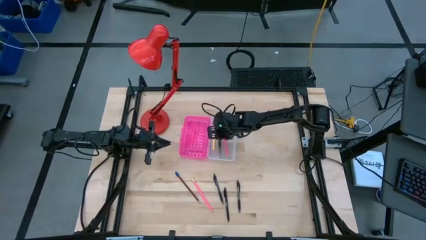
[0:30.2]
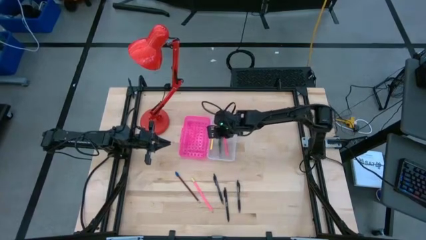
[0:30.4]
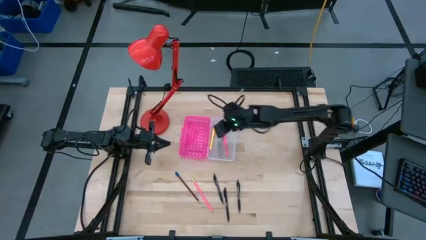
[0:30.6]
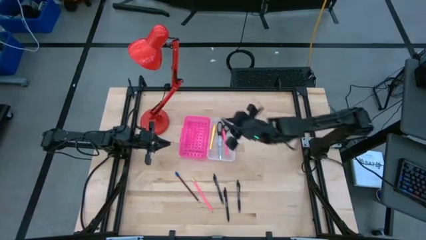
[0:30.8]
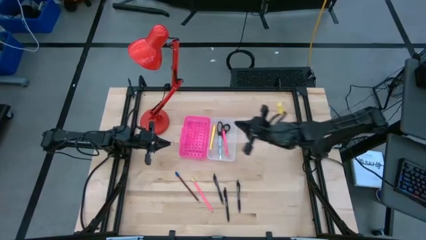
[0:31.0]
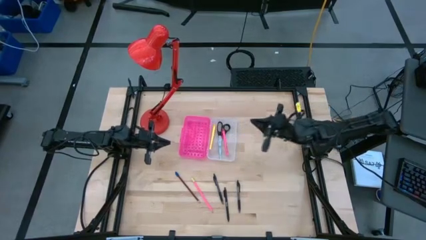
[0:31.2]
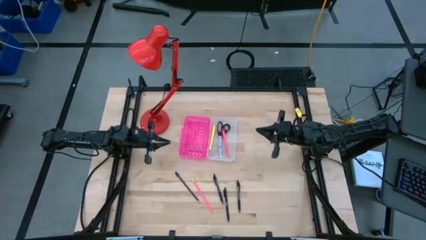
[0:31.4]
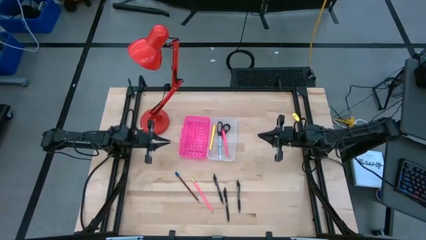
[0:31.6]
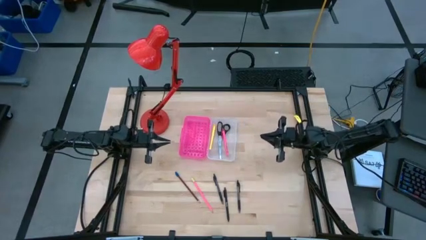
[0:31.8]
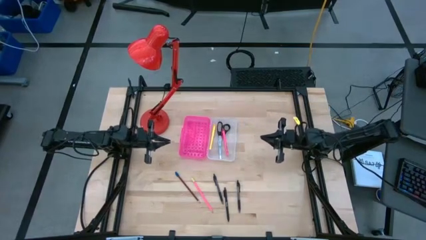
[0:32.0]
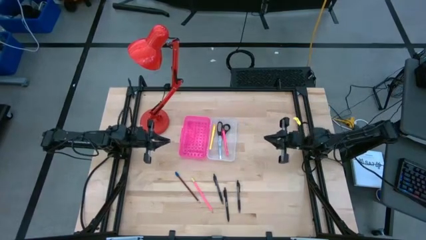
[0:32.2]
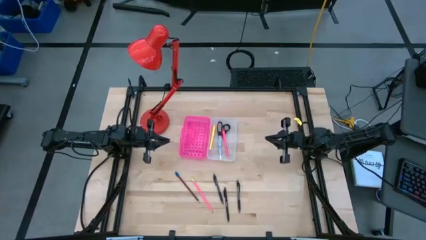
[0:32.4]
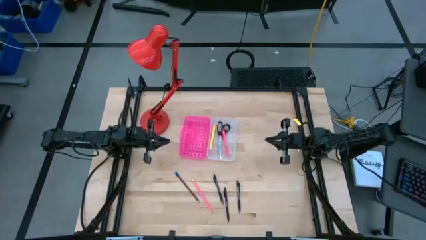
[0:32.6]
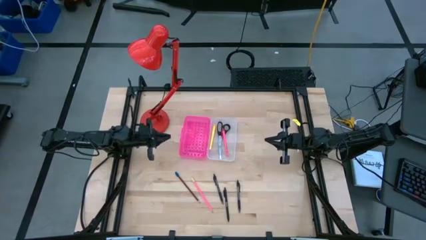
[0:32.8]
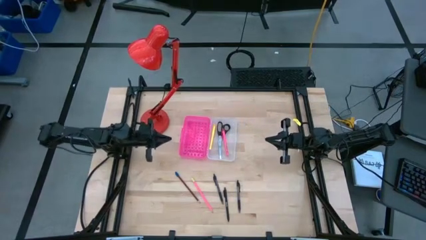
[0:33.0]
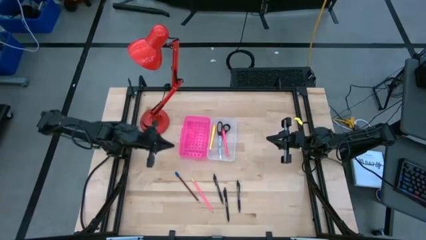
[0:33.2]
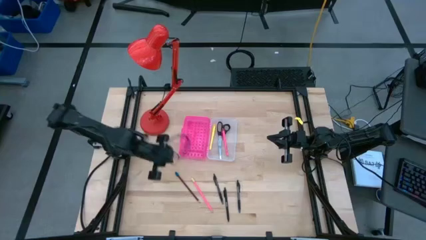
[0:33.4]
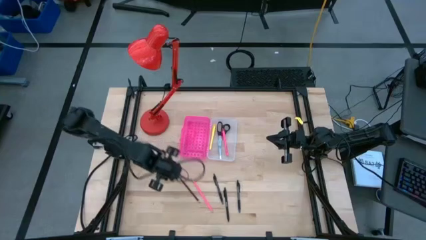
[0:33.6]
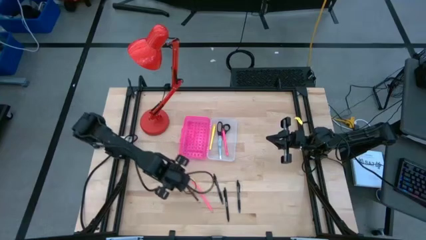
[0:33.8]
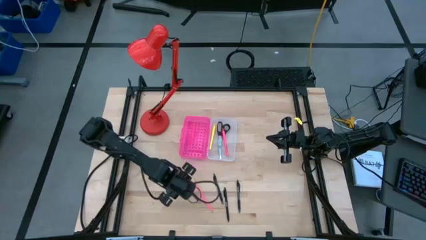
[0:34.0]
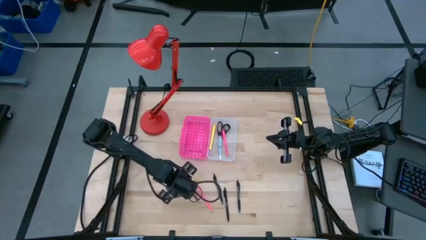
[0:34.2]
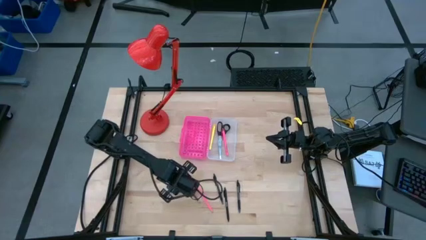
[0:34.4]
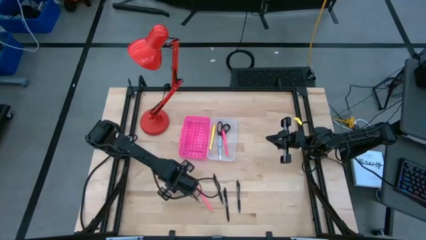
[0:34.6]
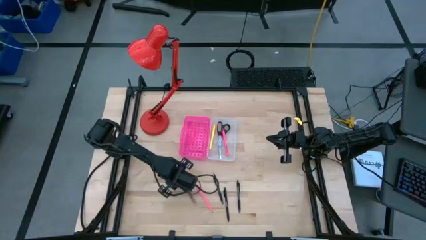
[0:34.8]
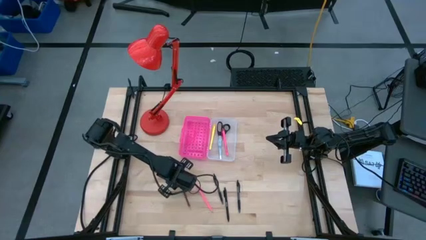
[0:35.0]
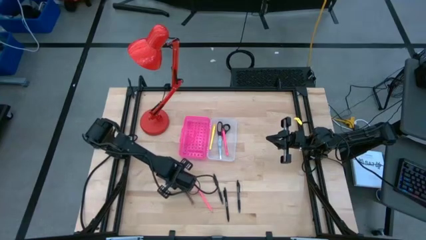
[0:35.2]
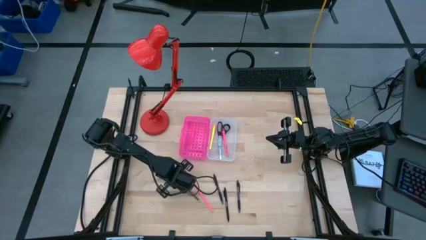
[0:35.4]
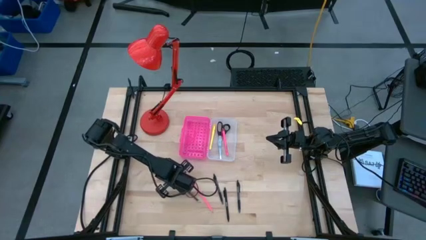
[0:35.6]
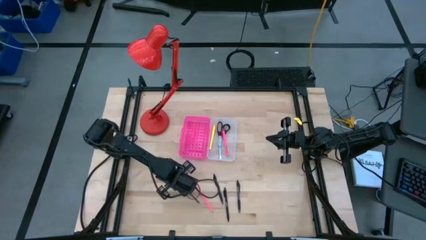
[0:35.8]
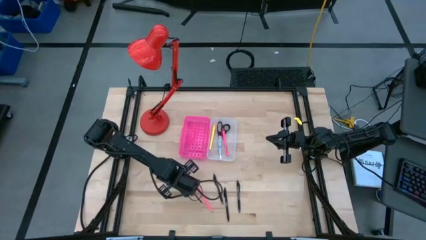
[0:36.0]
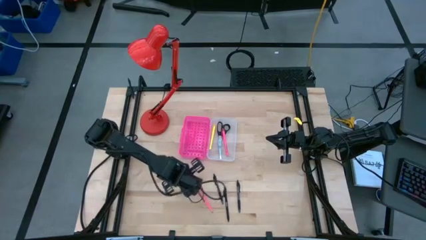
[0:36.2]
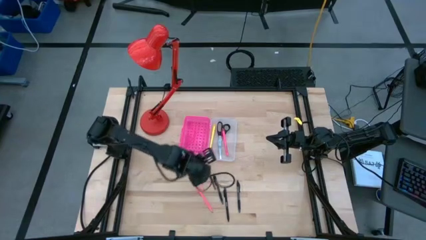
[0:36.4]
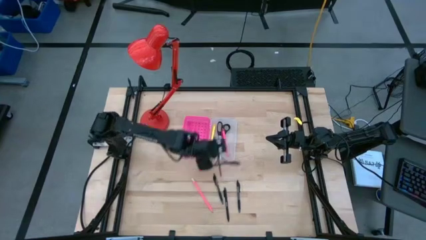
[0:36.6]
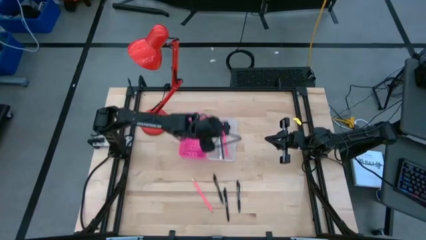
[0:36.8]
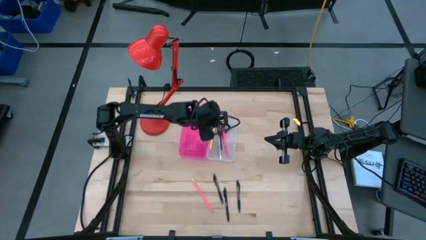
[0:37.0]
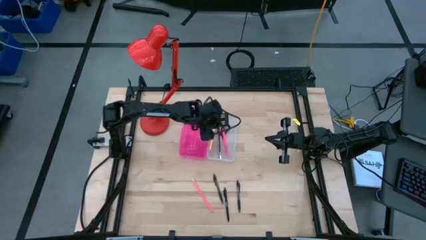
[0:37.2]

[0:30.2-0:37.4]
Task: Pick & place school supplies into a supply box
Put the brown pencil into the supply box

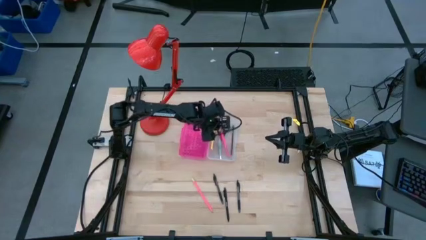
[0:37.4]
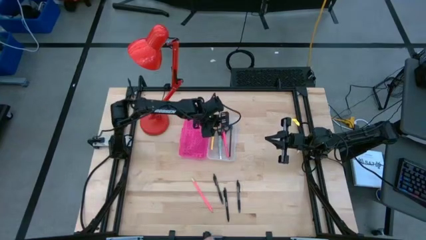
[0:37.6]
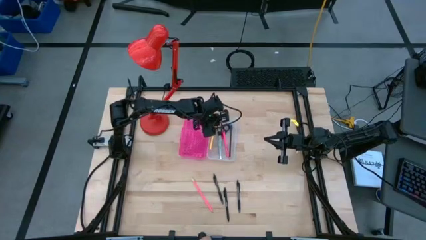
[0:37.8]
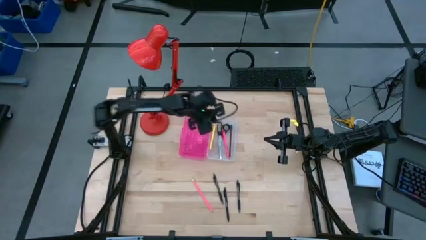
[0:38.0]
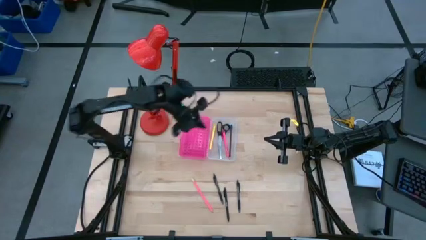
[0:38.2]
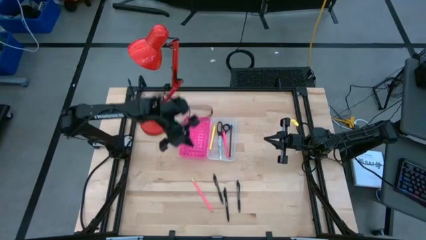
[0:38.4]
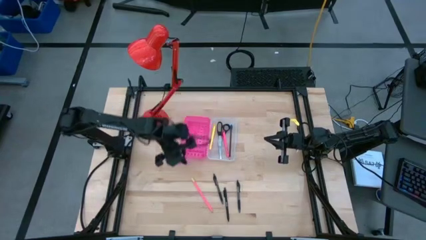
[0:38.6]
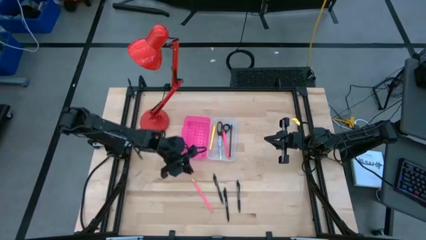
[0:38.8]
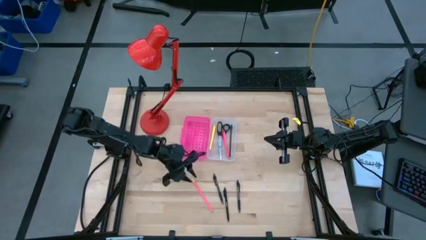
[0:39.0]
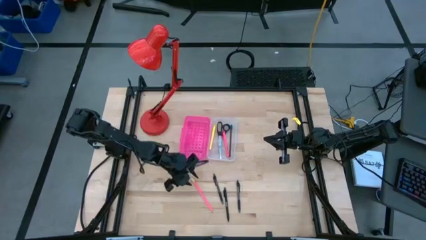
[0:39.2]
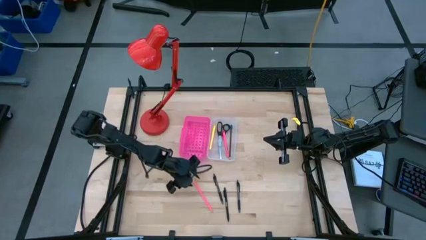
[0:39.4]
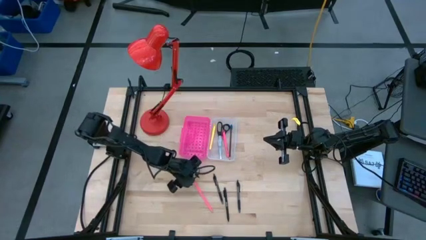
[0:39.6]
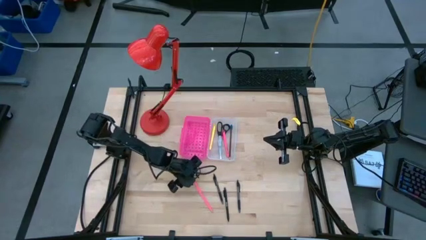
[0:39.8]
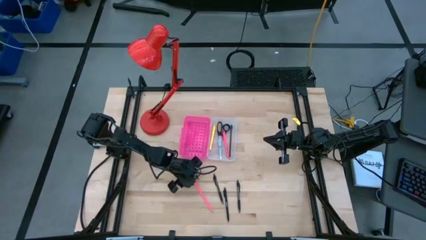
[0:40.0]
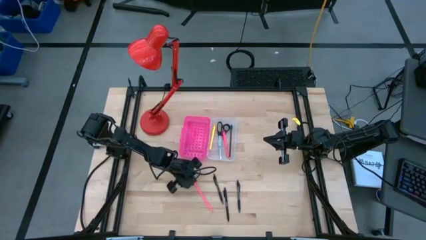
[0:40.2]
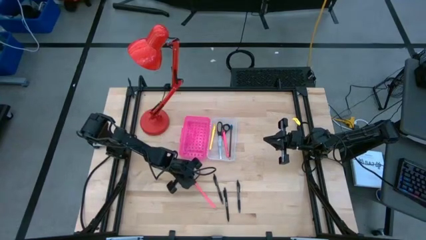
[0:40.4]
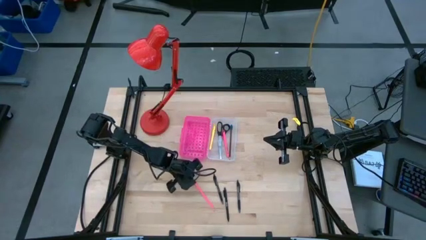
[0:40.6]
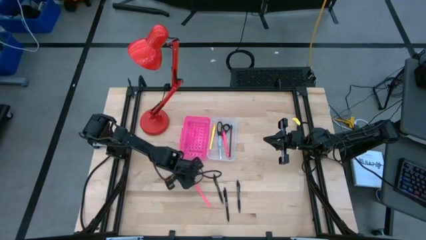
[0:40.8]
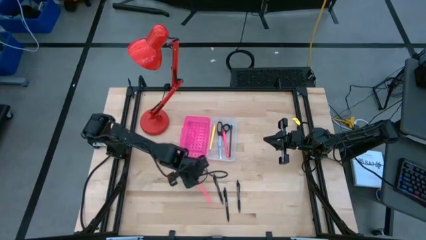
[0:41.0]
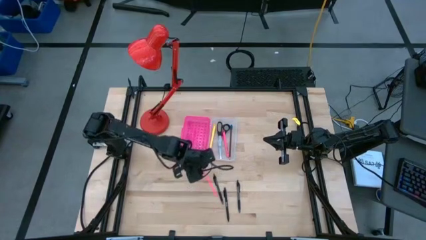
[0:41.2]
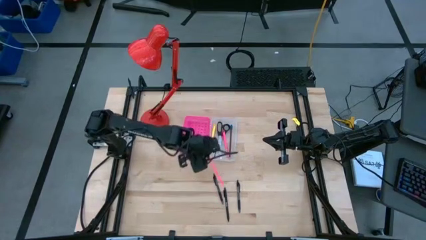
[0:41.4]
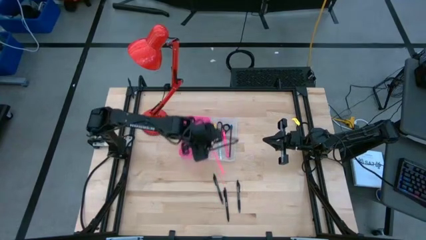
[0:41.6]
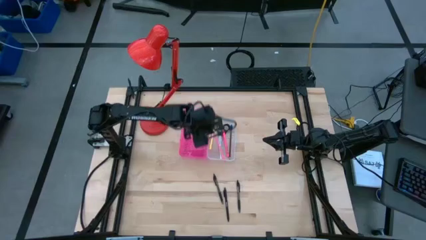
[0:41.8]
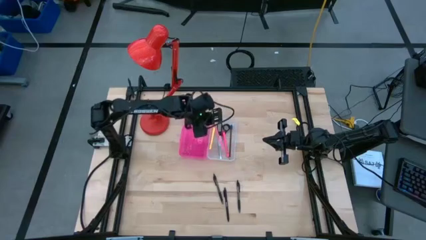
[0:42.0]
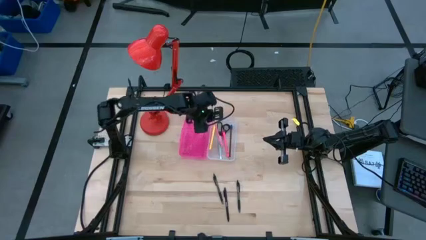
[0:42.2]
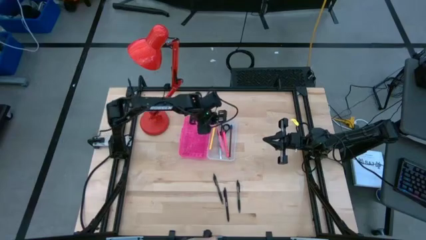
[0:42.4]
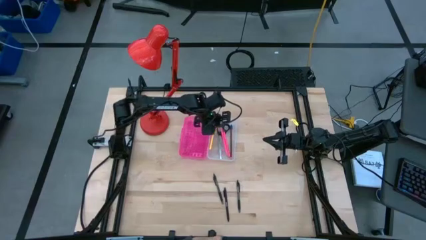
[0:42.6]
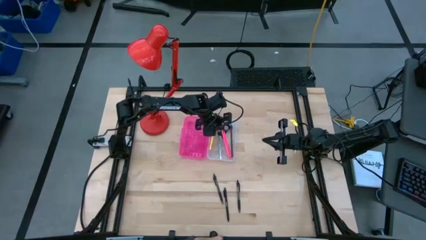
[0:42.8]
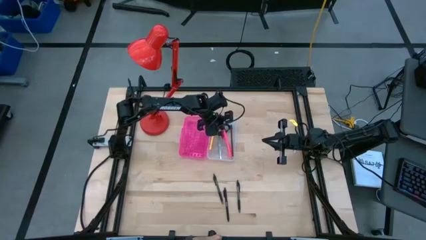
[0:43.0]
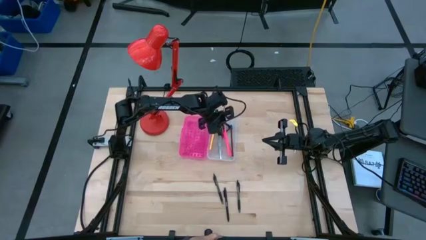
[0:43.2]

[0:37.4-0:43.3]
Put the pink pencil into the supply box

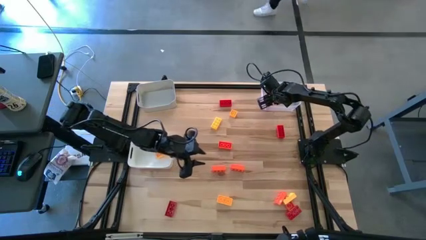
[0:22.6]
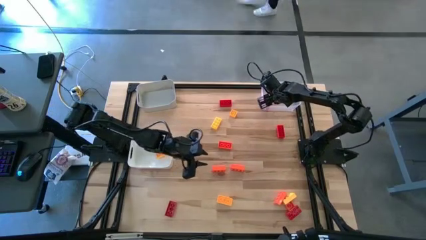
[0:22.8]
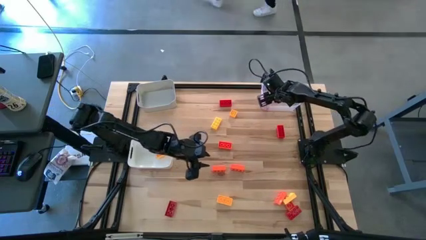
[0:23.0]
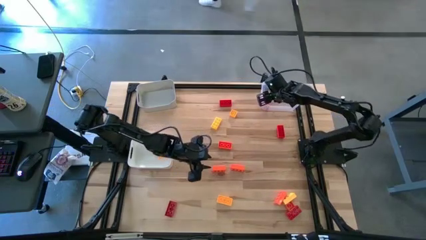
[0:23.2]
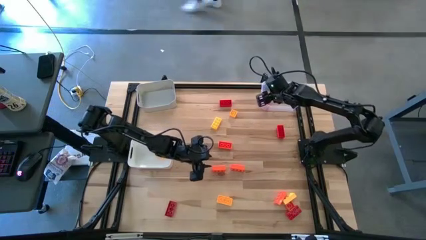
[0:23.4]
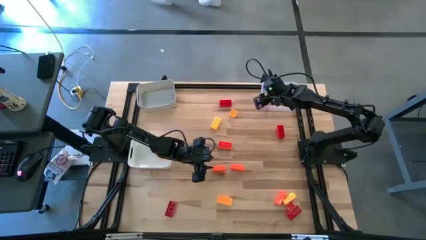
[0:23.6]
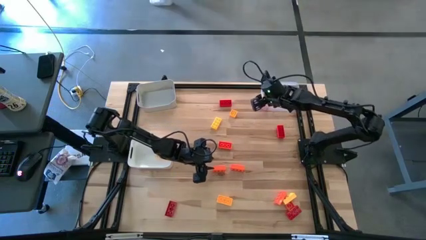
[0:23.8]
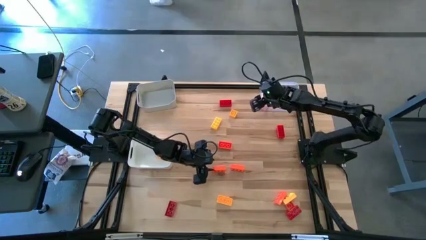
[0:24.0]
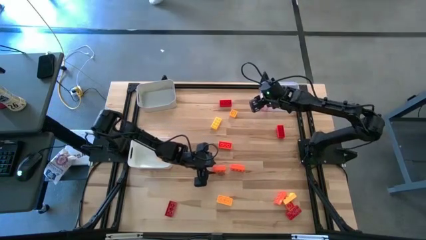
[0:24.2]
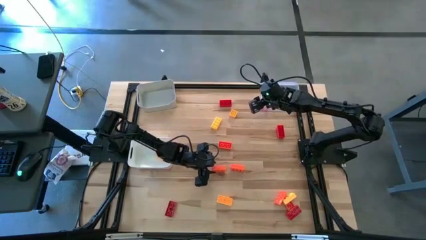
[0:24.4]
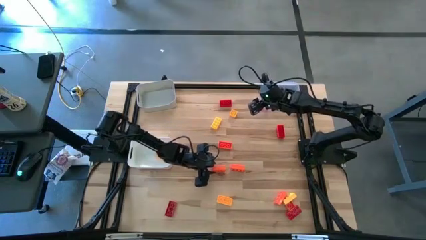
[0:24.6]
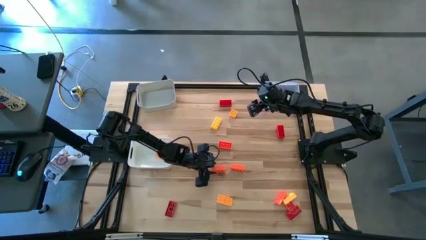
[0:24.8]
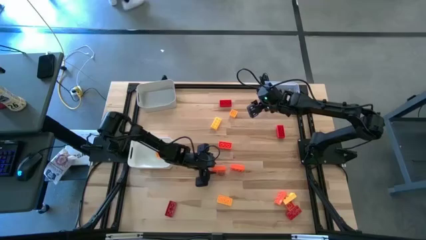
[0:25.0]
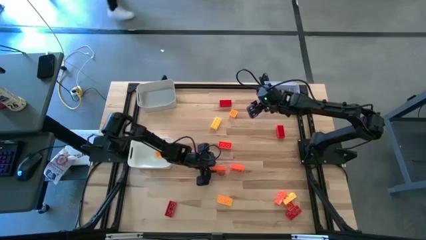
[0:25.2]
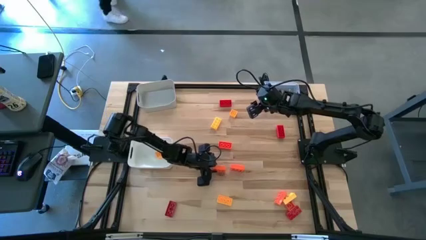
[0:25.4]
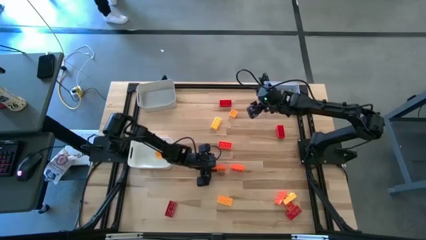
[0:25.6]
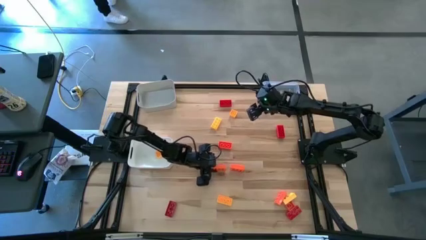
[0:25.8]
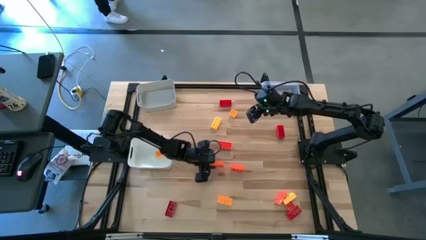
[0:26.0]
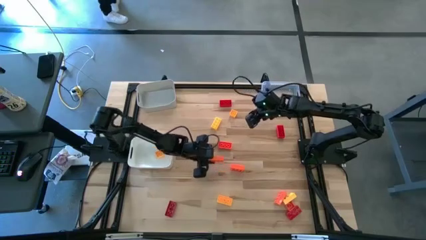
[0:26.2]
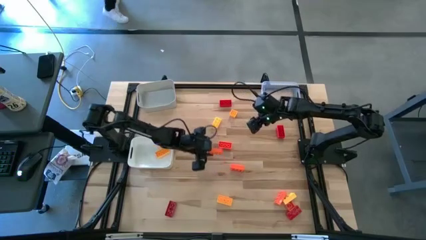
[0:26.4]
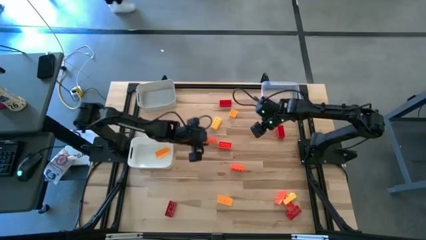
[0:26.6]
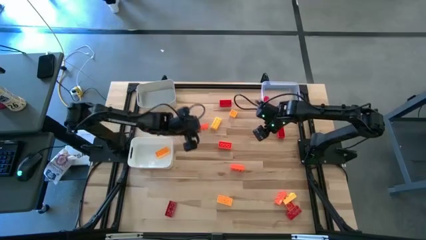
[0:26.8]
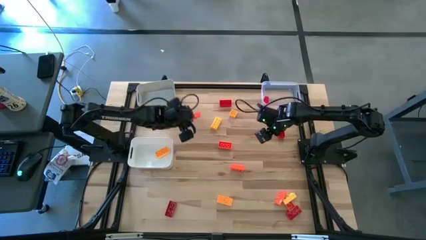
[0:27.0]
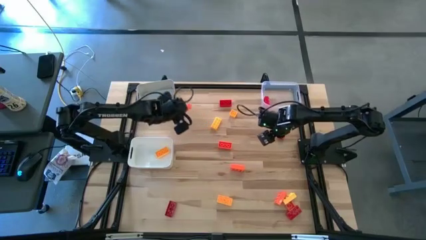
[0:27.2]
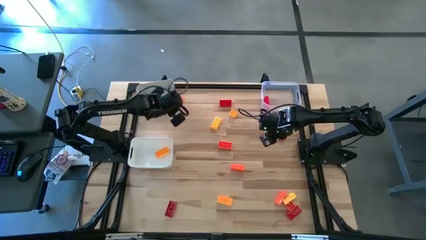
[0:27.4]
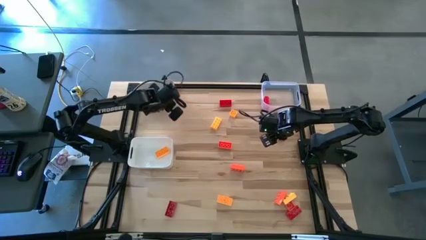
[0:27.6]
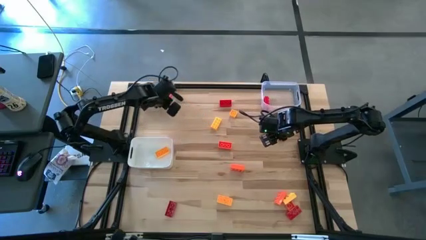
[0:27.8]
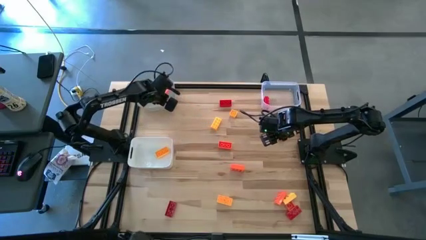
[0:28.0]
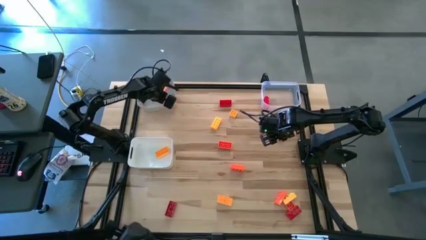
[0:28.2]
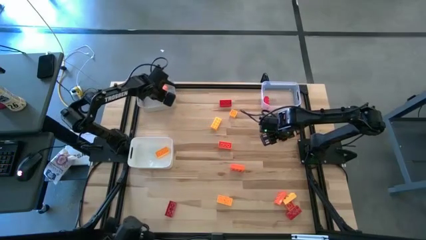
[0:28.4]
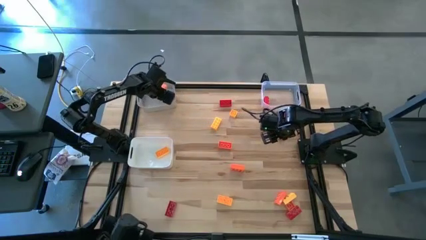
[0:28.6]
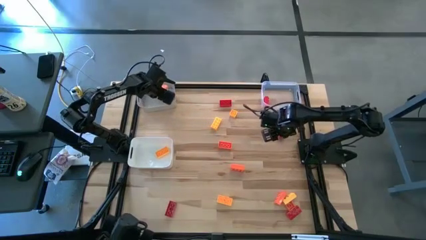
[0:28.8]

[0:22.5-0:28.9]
Task: Sort & place blocks by color
Put the orange game piece into the gray bin
